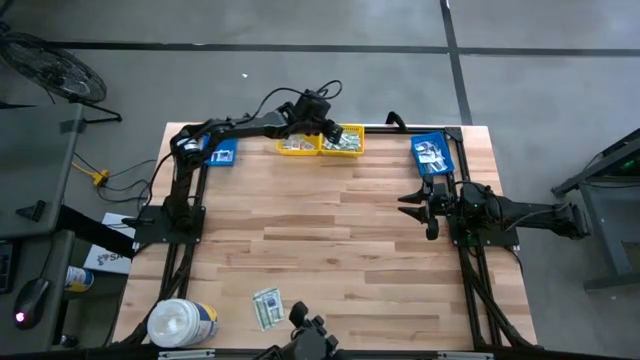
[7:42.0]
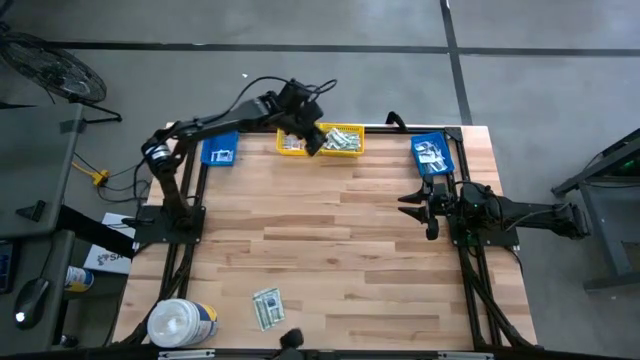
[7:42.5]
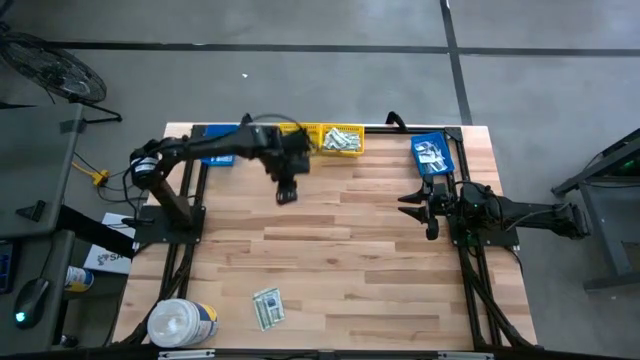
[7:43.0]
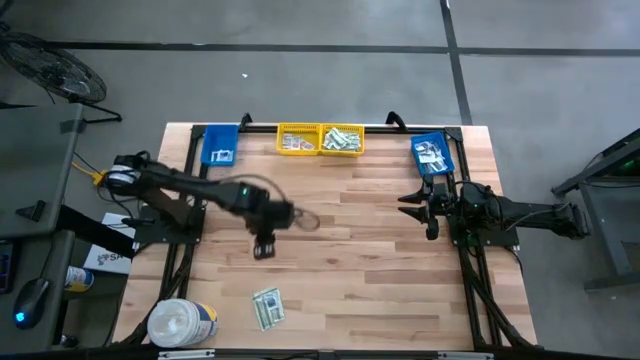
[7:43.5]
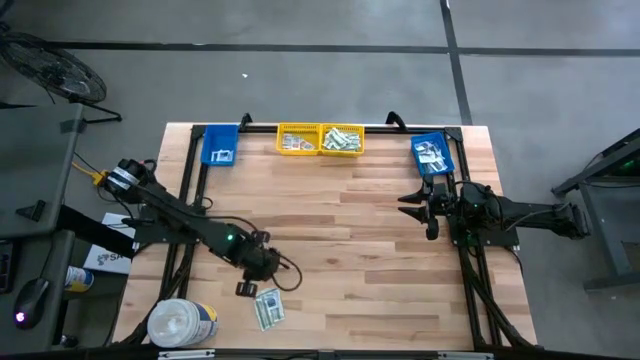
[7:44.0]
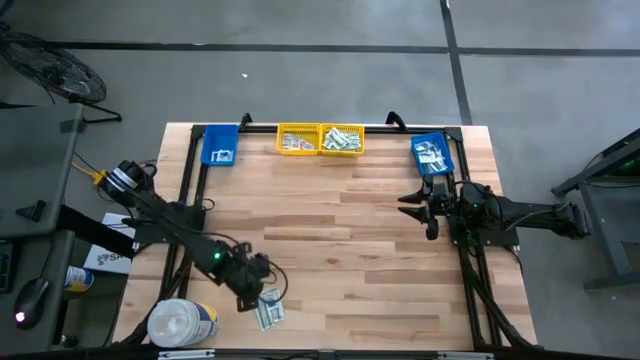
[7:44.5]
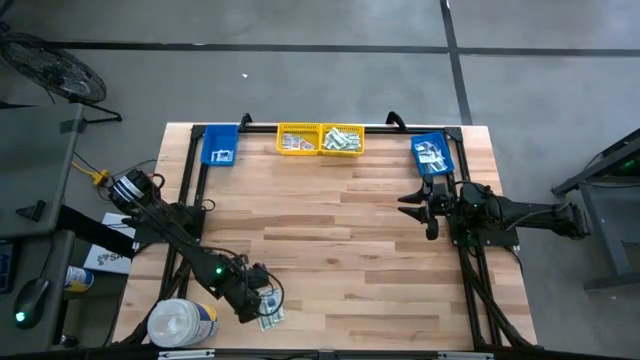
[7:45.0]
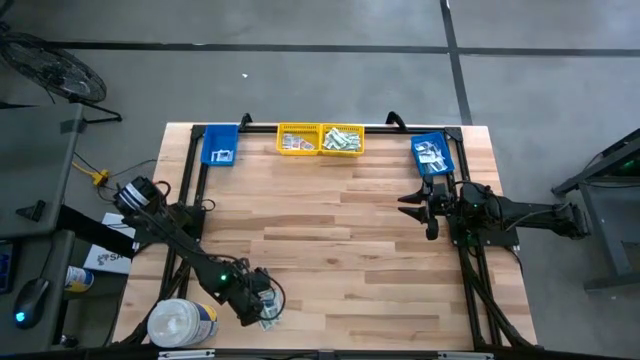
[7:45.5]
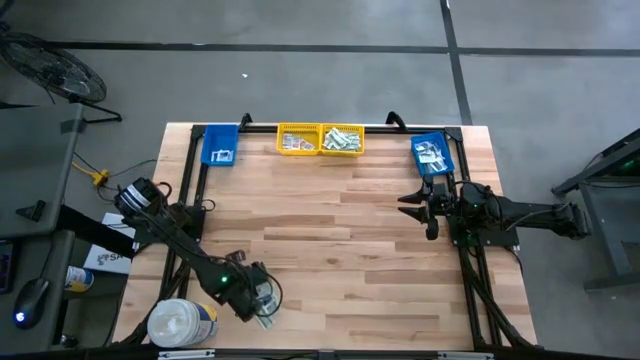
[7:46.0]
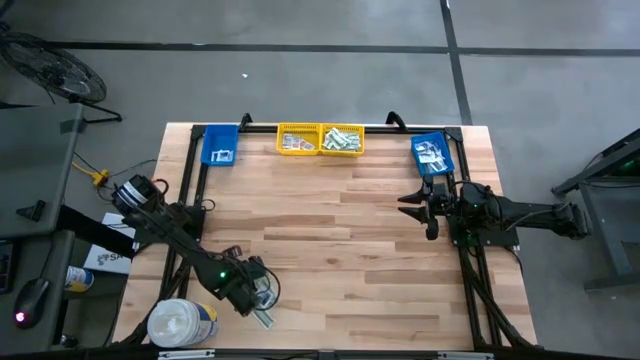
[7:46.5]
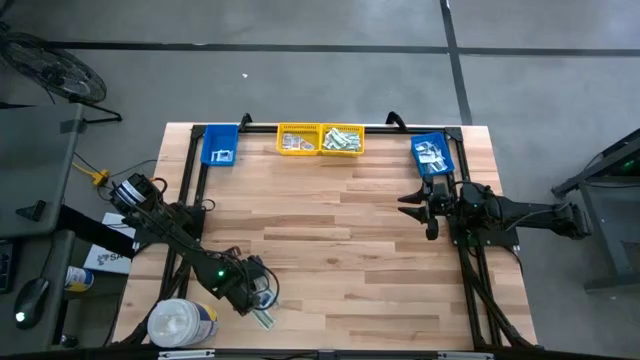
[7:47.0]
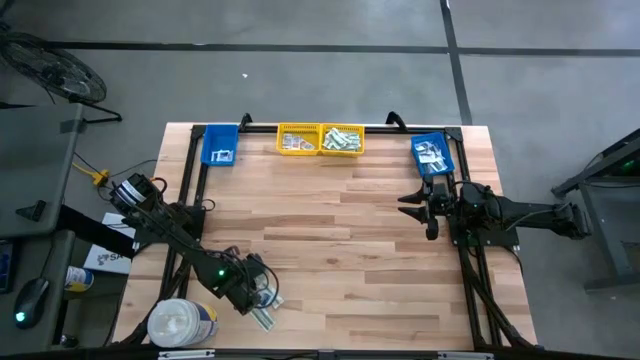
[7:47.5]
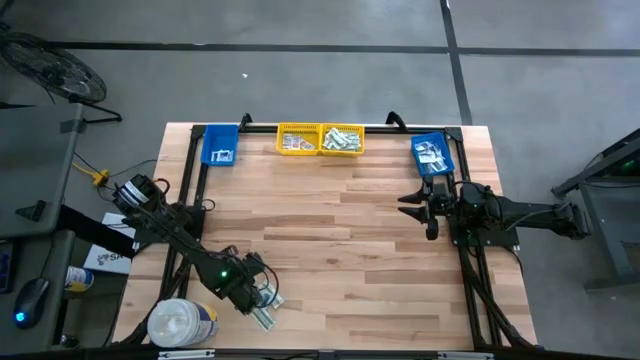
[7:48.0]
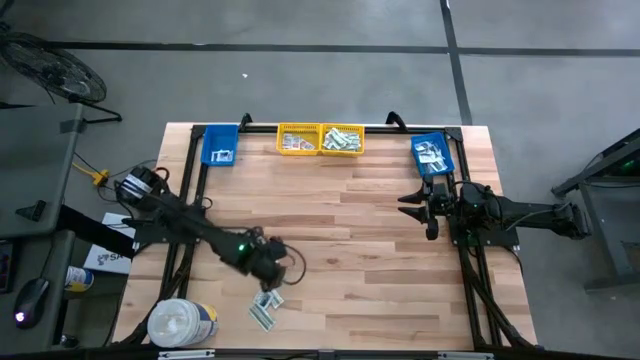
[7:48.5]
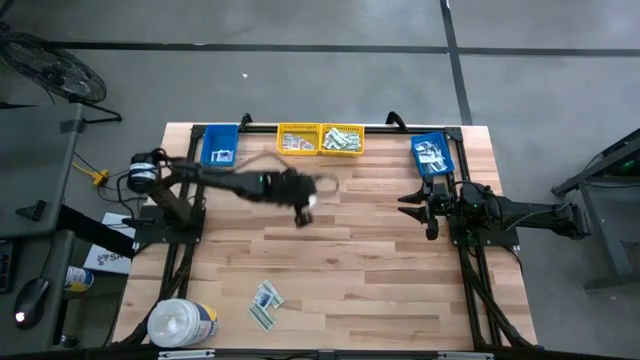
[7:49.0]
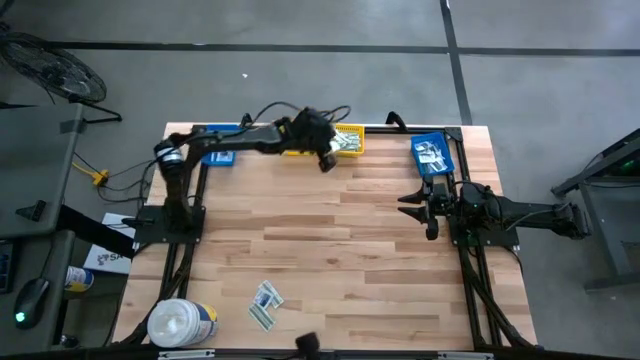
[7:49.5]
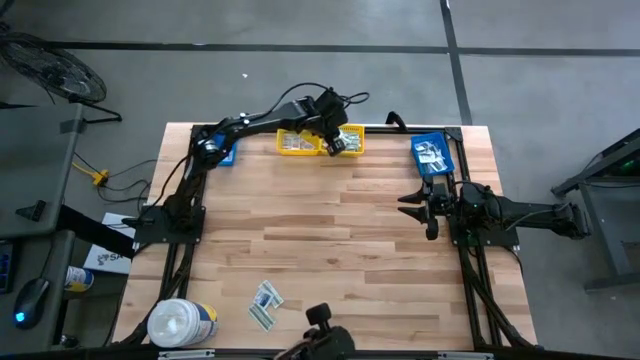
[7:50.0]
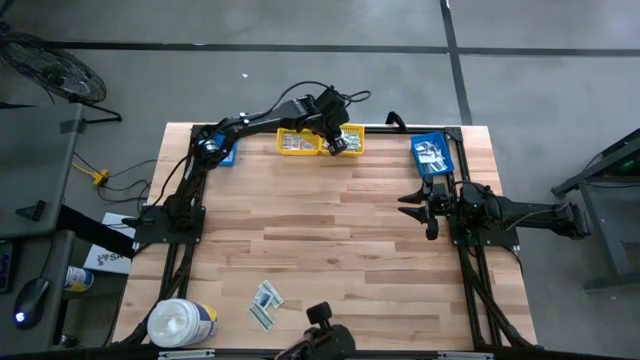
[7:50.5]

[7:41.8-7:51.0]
Task: Pick & Place First Aid Supplies
Put the green bandage pack into the right yellow bin

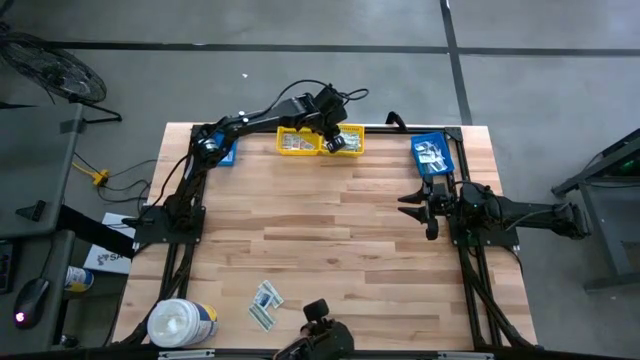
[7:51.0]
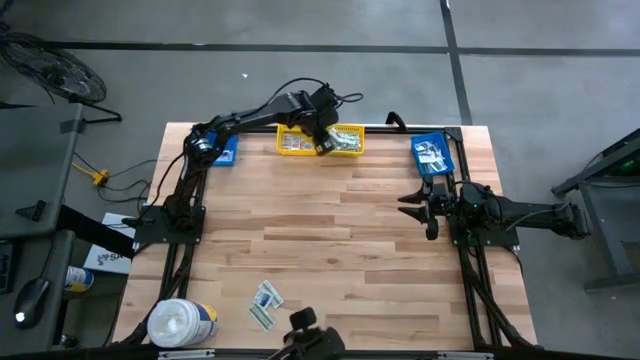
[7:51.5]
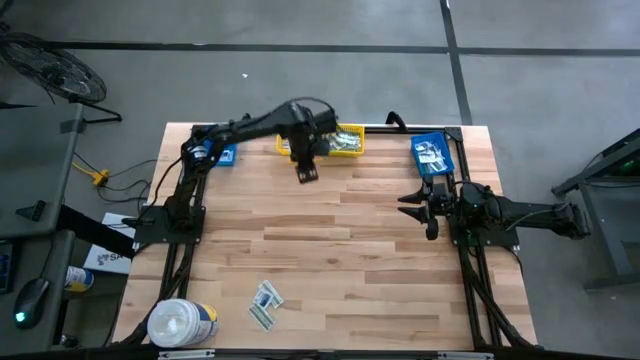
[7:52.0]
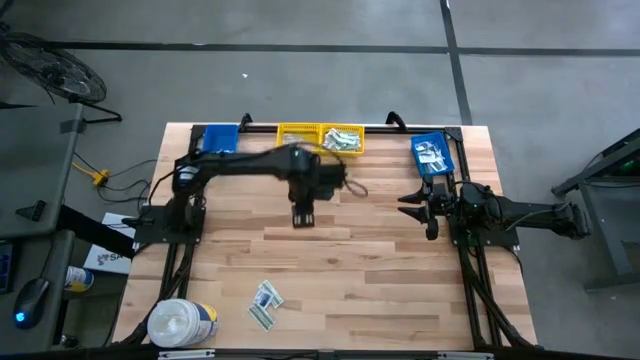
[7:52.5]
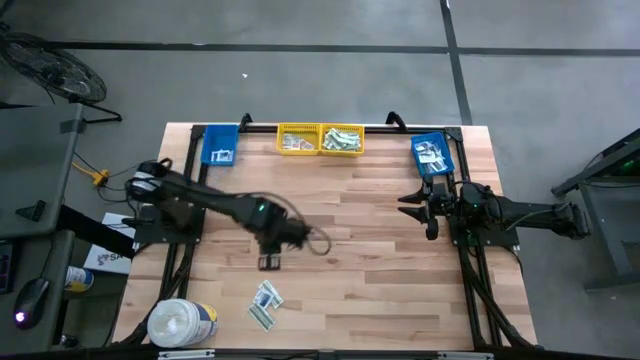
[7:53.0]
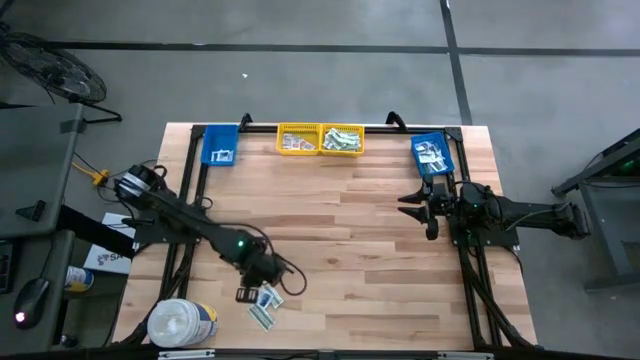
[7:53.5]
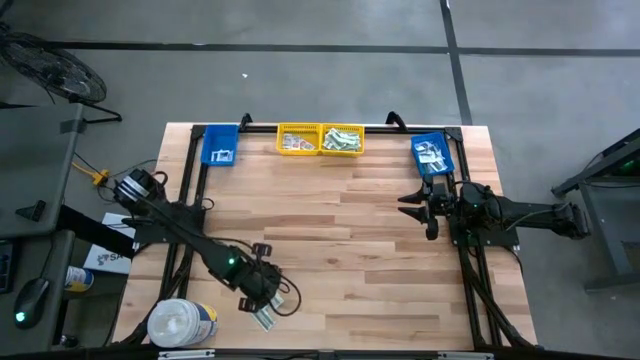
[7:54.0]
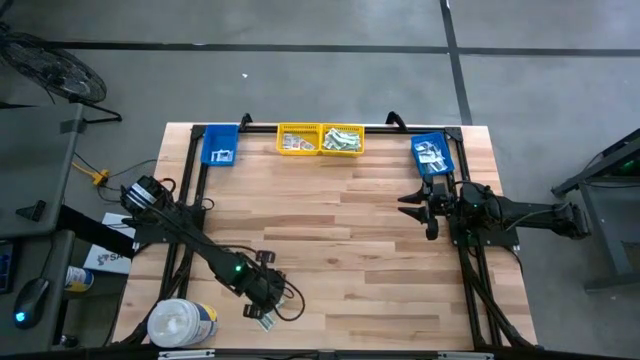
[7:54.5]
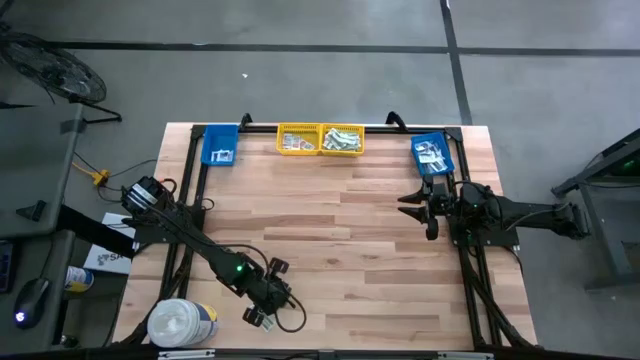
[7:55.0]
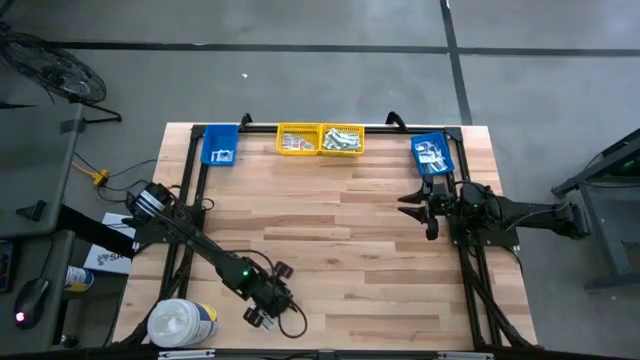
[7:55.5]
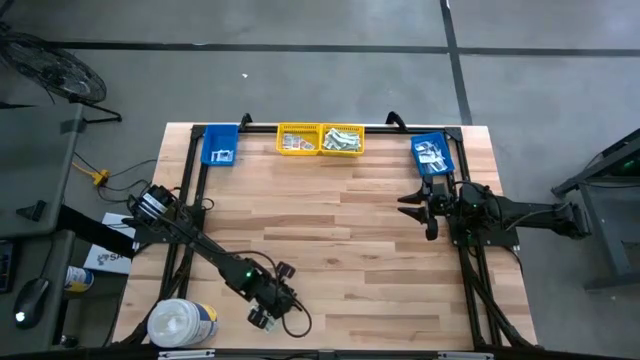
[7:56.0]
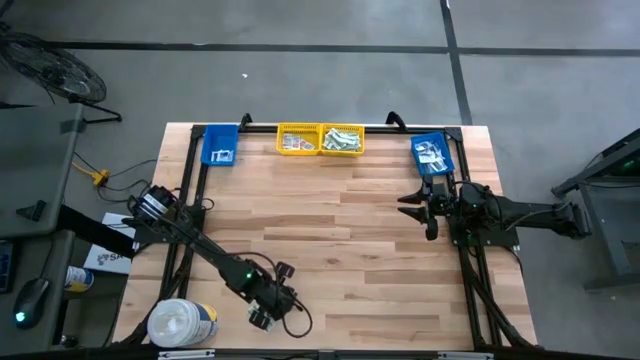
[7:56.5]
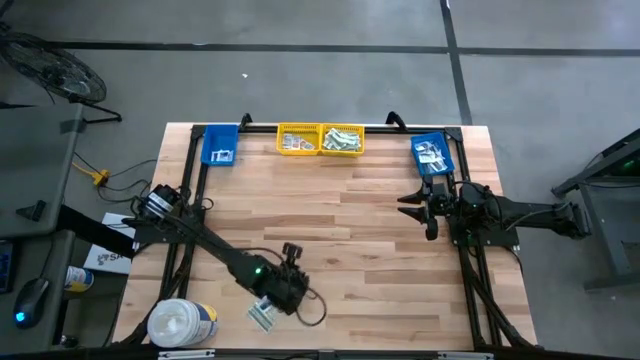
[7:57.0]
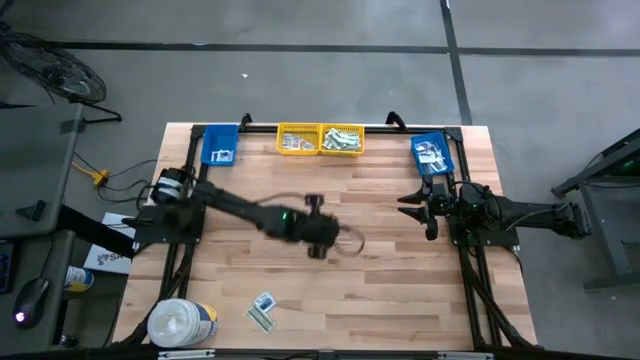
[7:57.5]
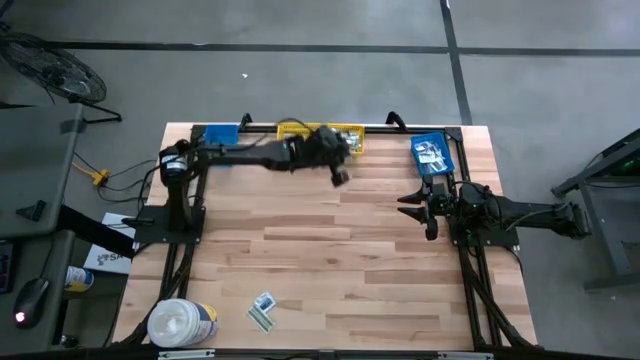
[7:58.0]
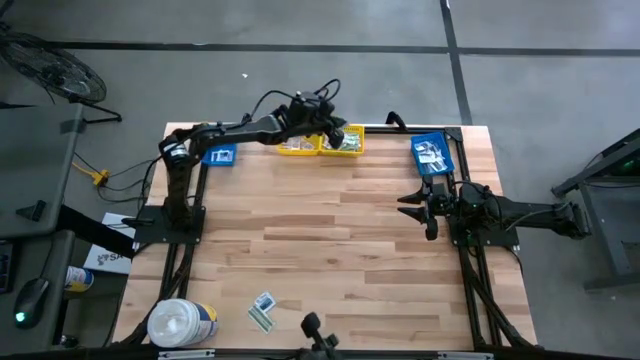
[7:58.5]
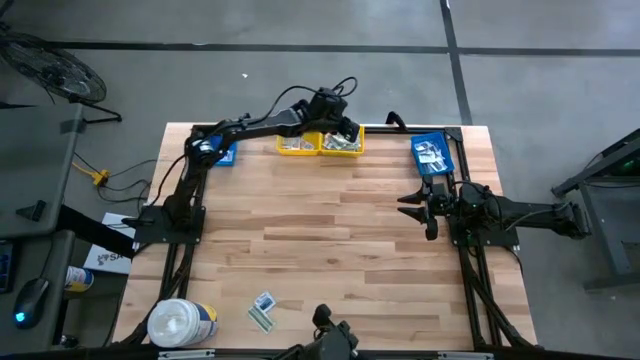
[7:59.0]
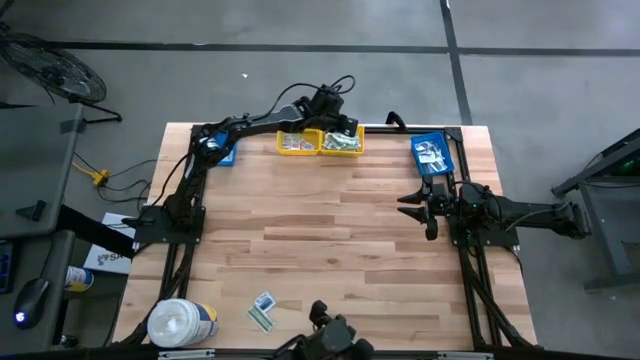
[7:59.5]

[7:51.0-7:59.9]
Put the green bandage pack into the right yellow bin
